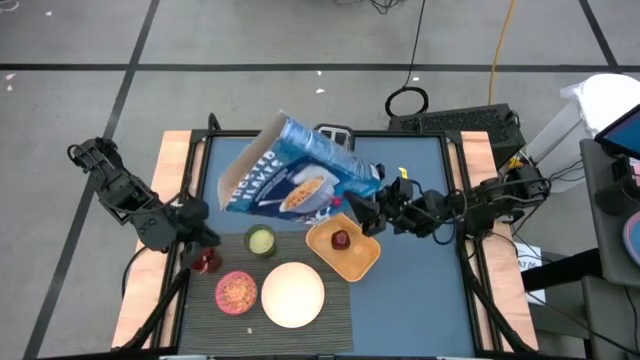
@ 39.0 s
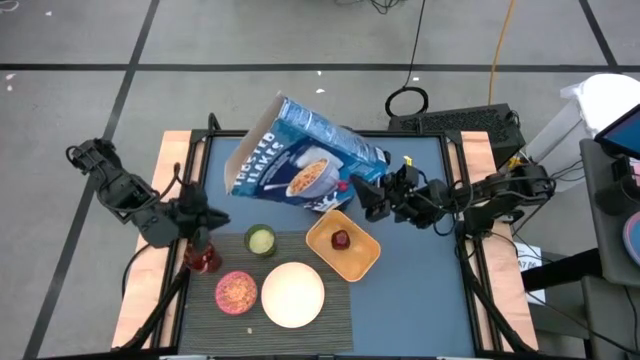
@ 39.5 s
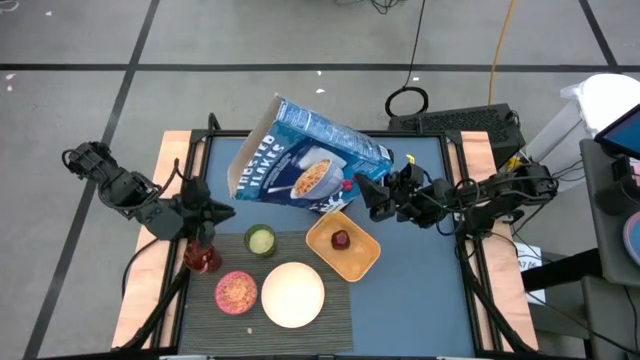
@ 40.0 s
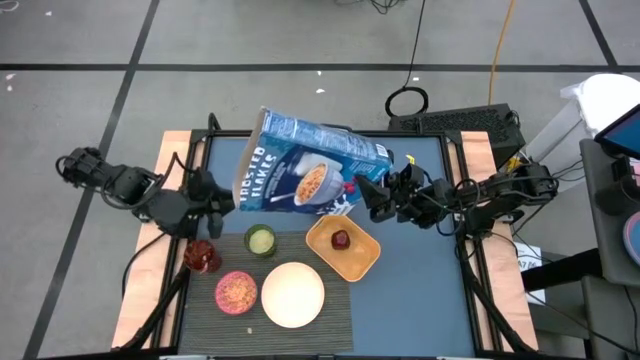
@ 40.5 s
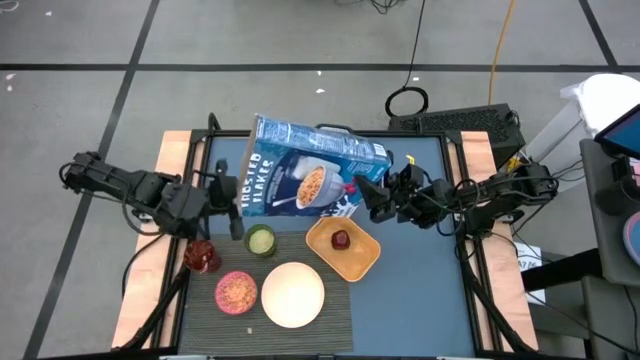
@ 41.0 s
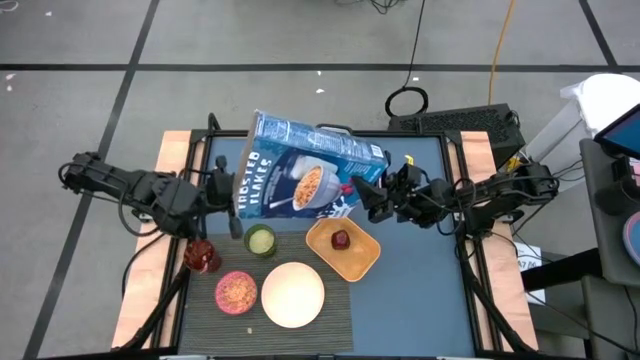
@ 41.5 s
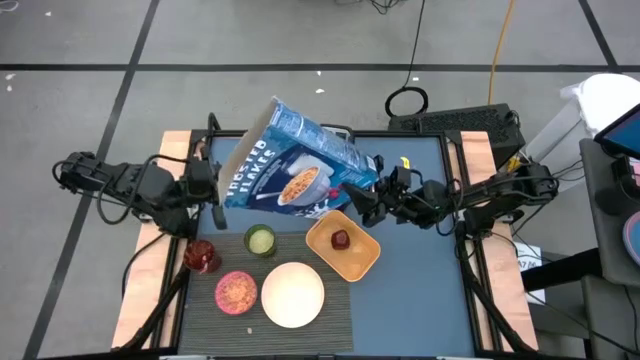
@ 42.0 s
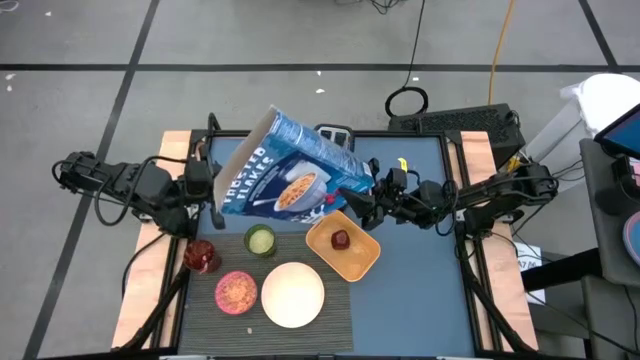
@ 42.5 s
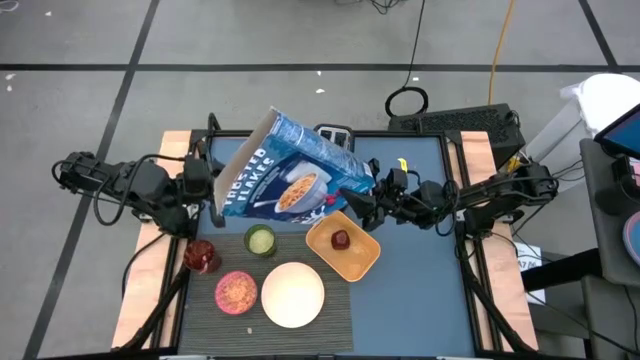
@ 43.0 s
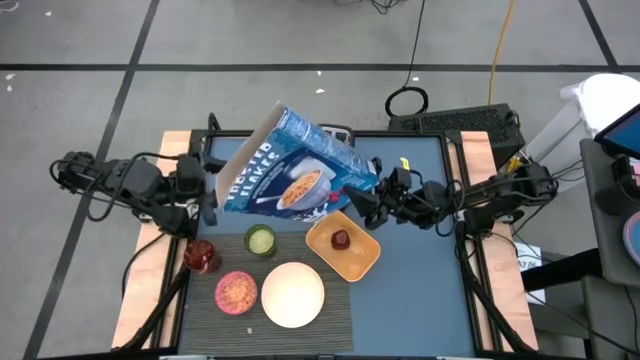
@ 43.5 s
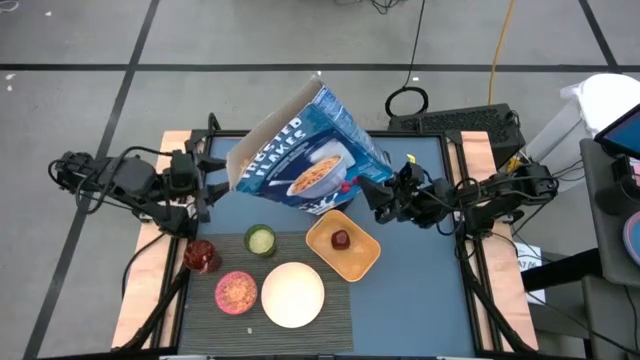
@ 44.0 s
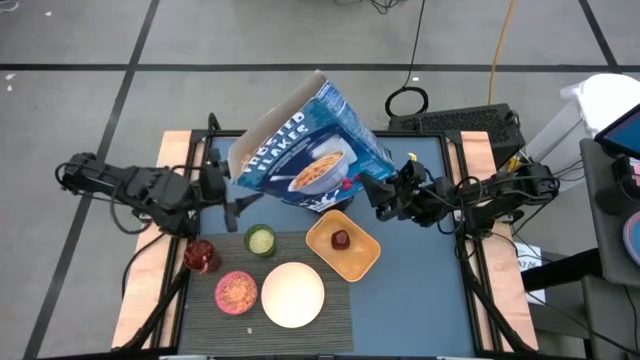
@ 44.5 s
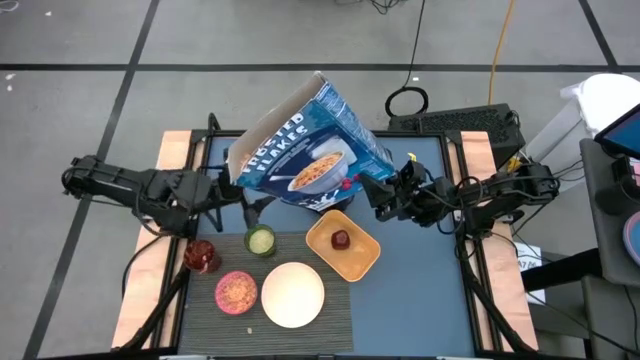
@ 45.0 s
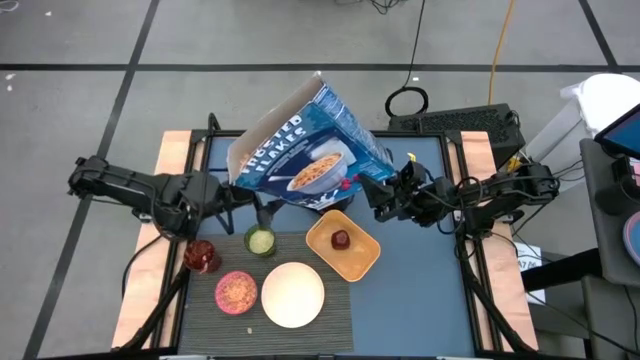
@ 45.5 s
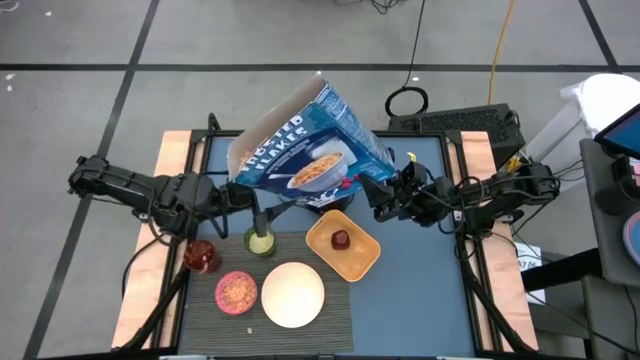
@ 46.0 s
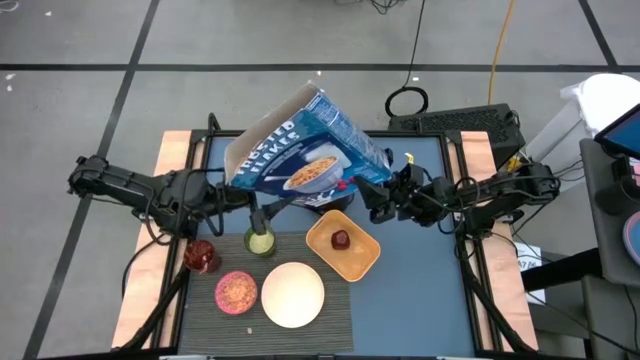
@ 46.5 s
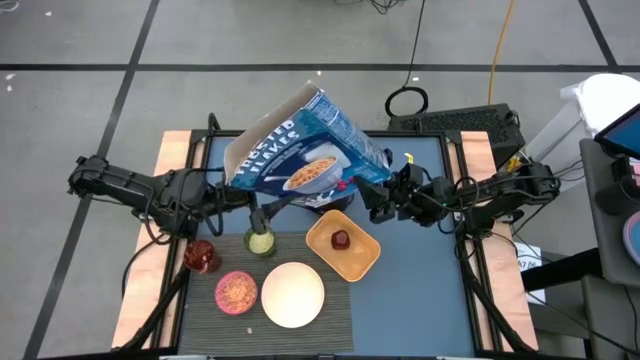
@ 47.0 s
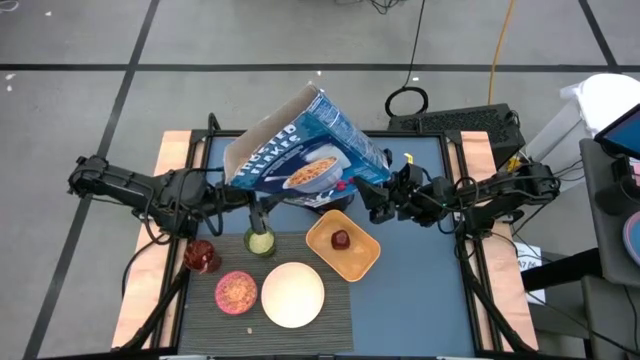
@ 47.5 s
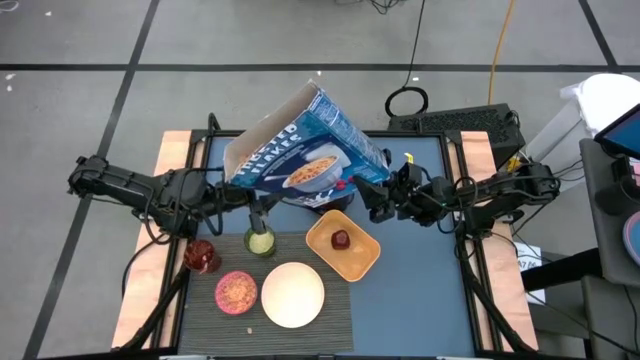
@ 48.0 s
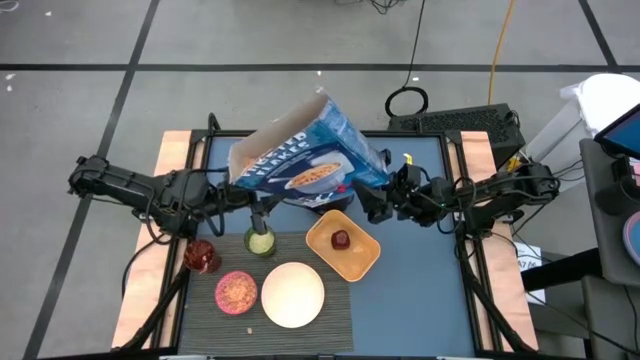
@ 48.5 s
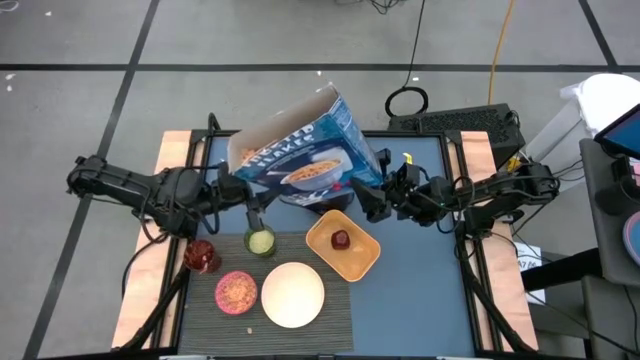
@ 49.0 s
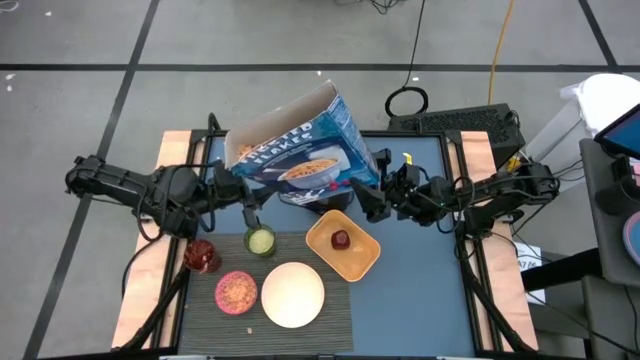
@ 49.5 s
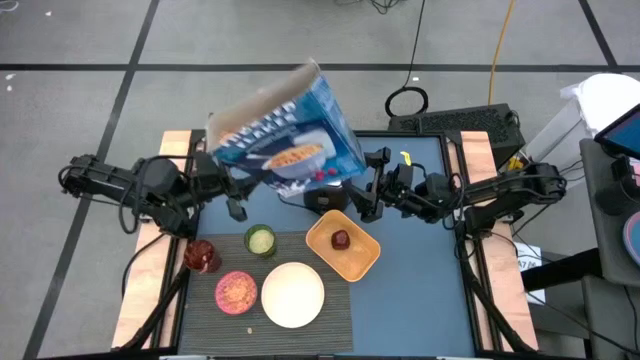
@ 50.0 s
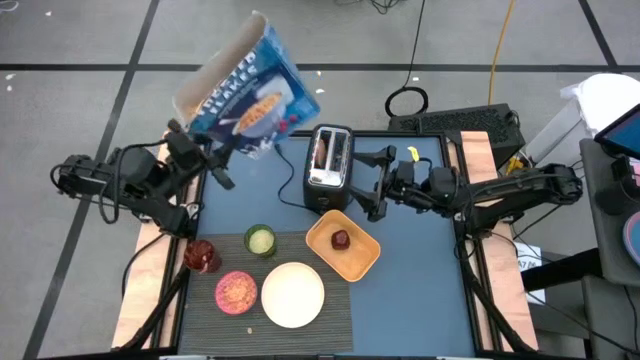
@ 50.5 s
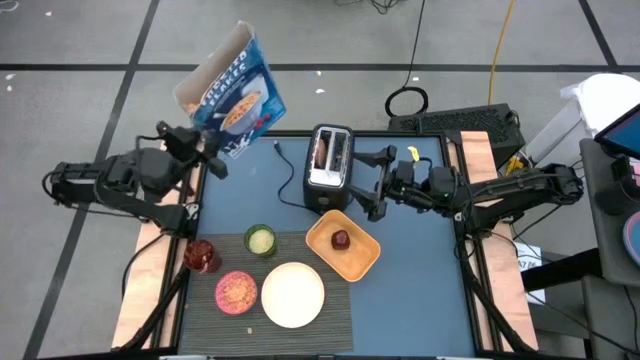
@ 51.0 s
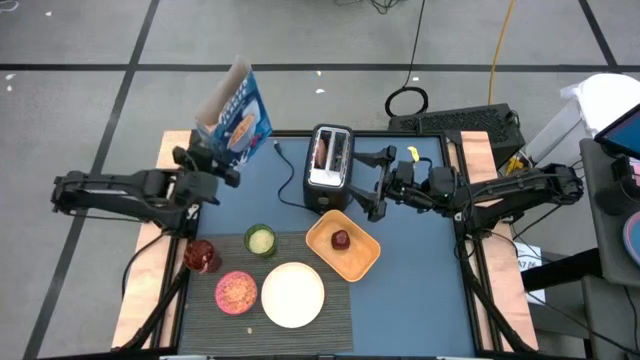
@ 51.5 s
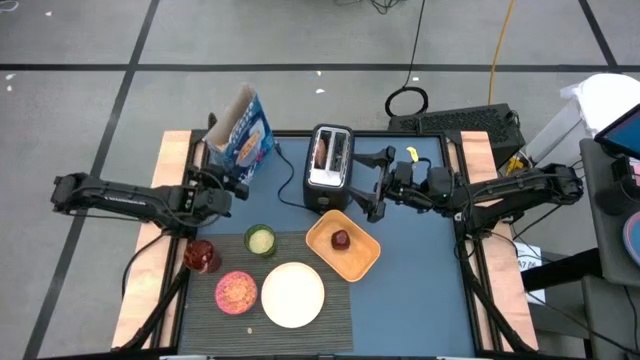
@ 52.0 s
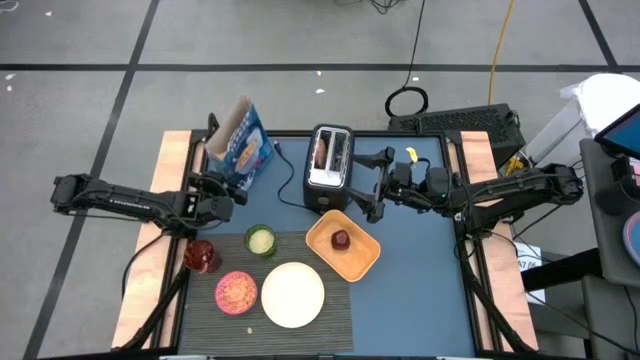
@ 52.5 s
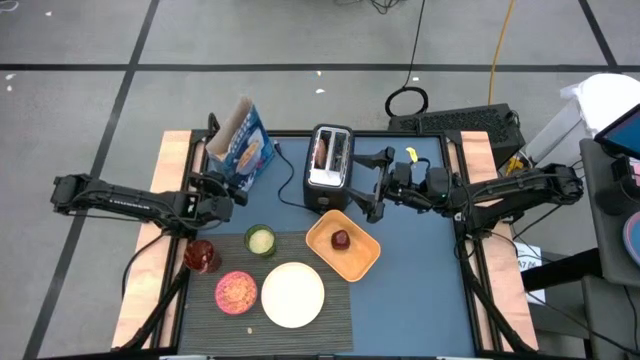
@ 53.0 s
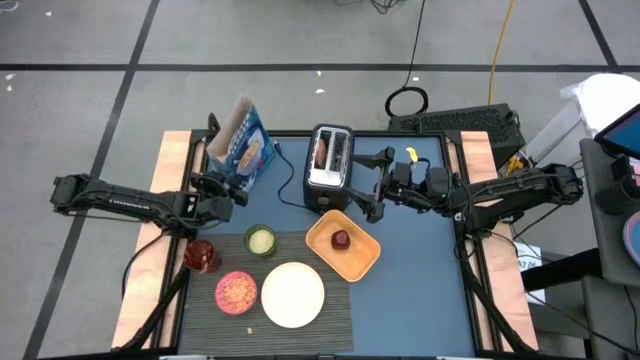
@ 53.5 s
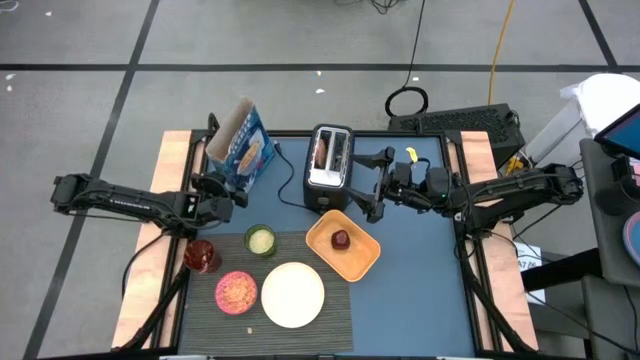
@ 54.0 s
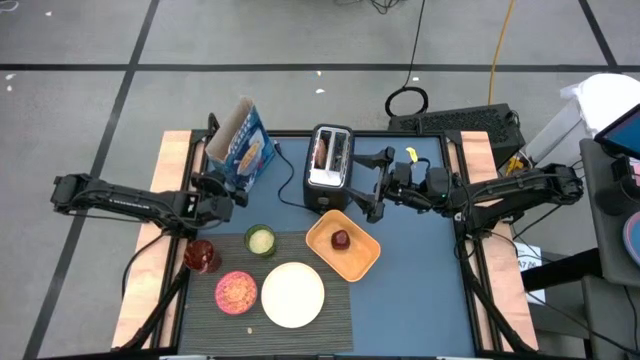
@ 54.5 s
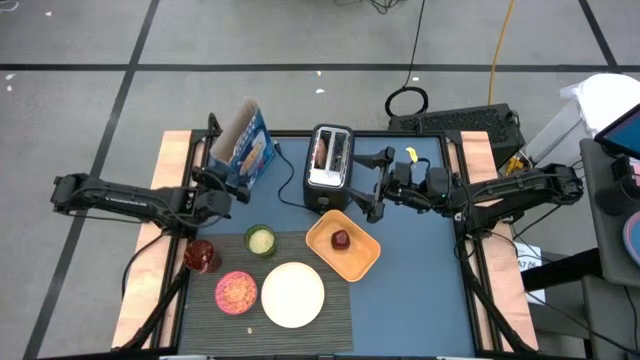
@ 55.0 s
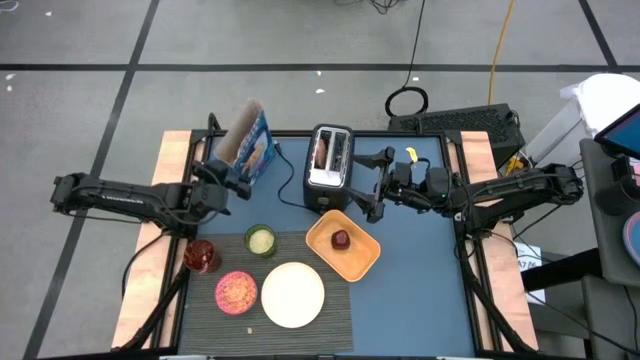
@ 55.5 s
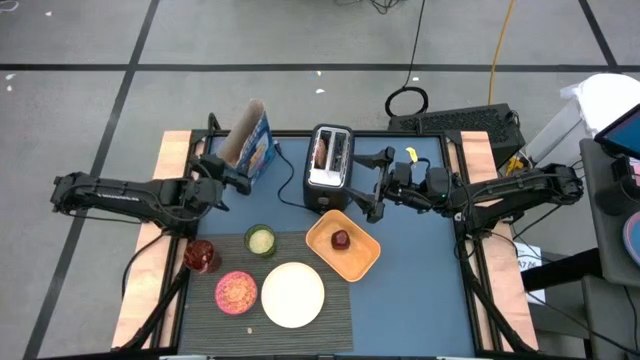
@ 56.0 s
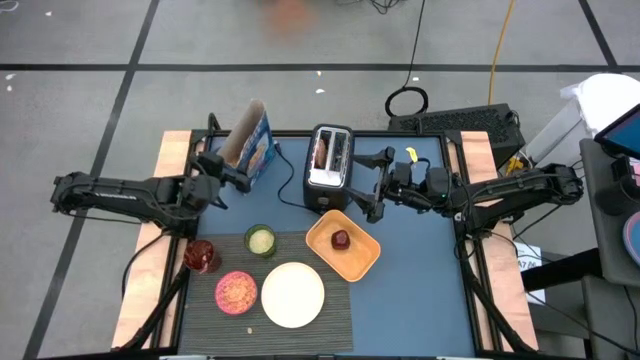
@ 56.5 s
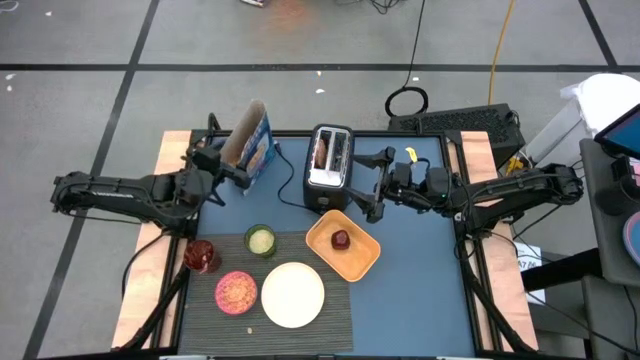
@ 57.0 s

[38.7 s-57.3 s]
Task: Arrange a breakfast setting
Pour the cereal from the blue cereal box into the red bowl

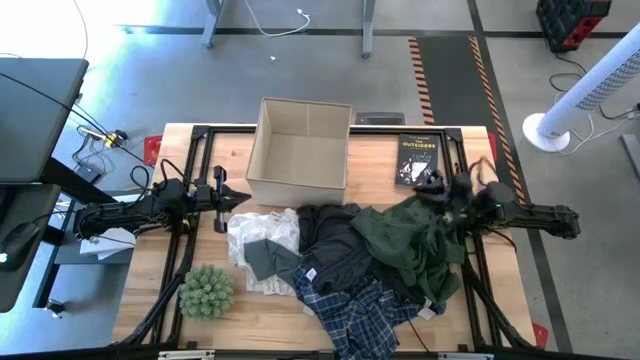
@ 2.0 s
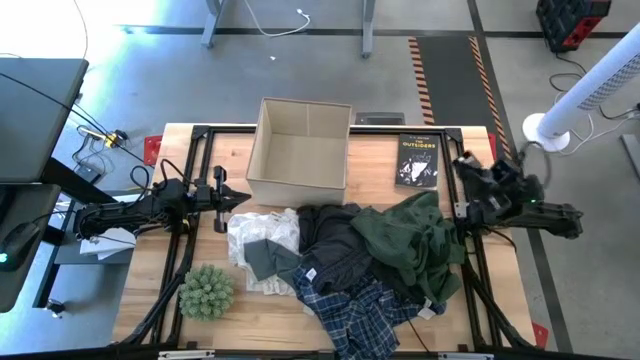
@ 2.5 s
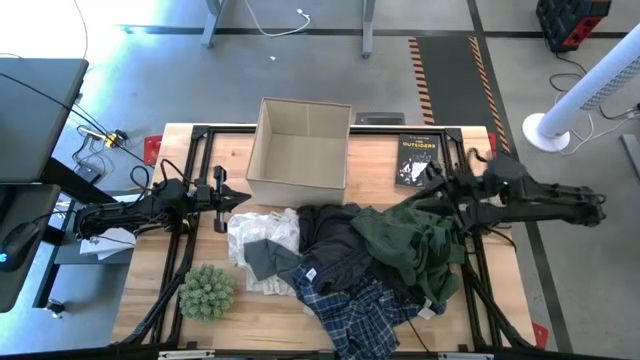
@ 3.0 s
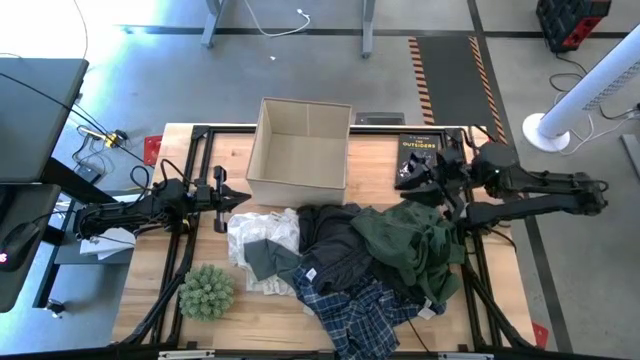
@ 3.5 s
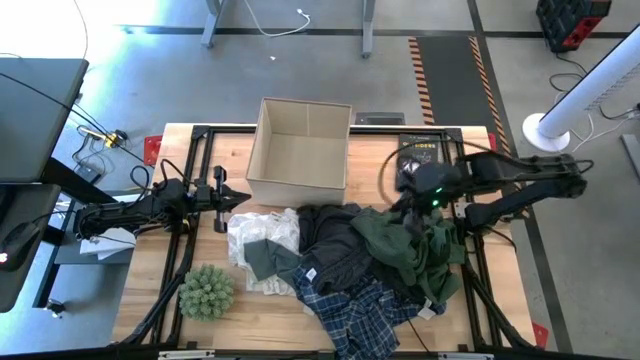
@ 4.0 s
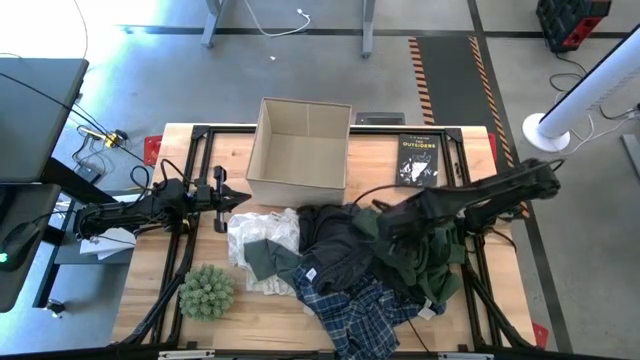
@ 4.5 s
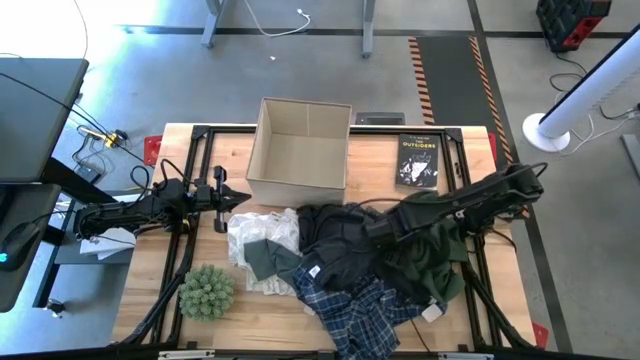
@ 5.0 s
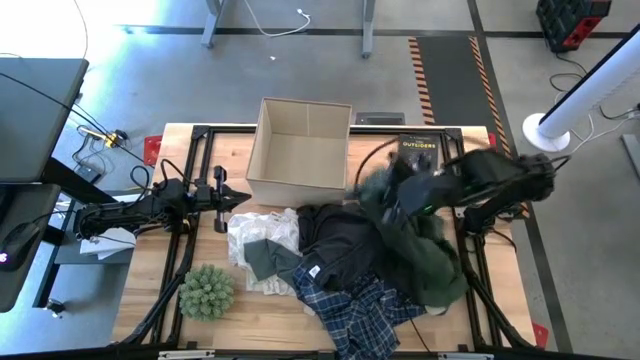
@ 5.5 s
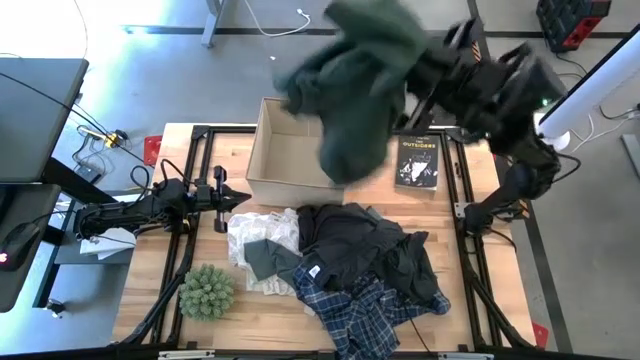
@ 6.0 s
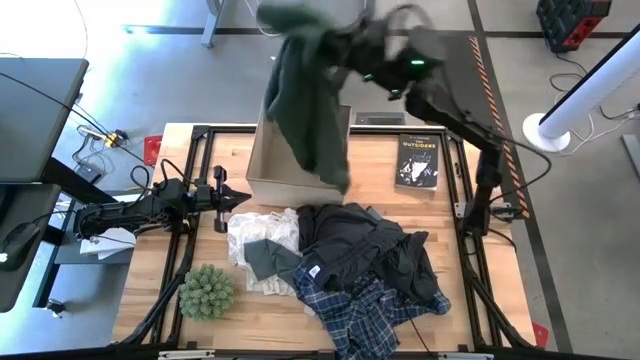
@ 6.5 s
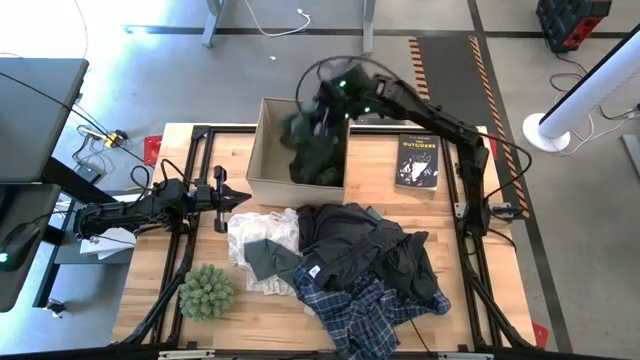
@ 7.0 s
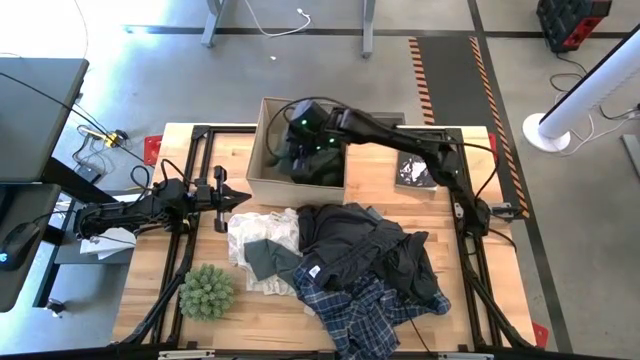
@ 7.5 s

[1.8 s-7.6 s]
Task: Sort clothes
Put the green jacket into the white bin
